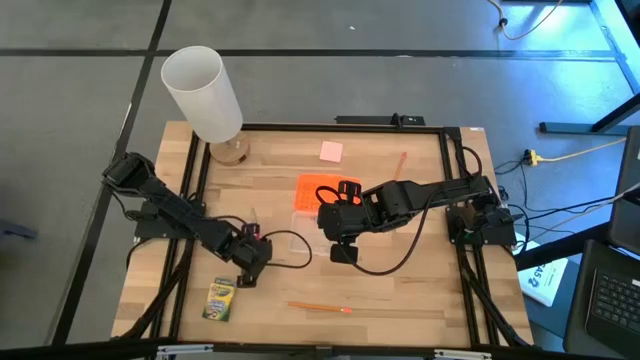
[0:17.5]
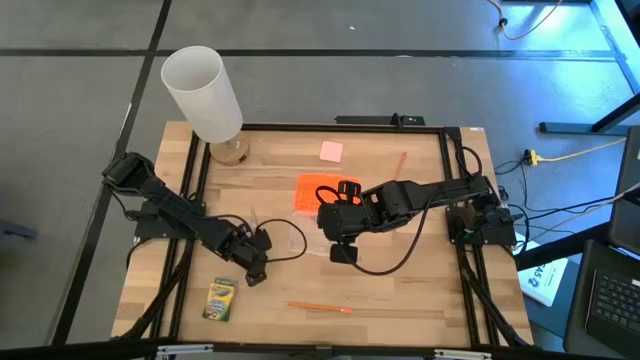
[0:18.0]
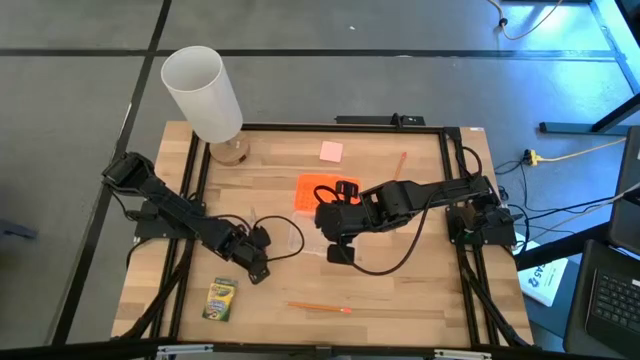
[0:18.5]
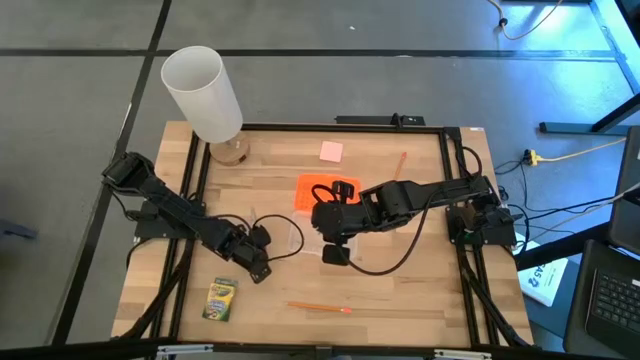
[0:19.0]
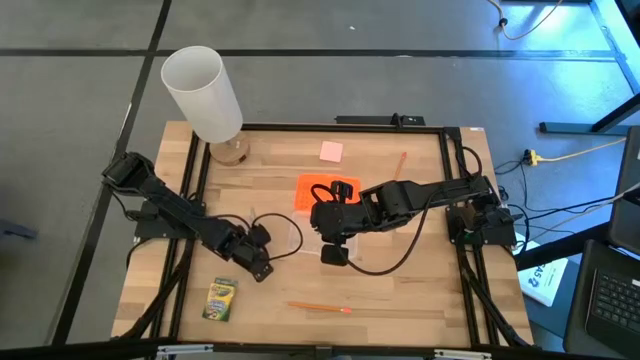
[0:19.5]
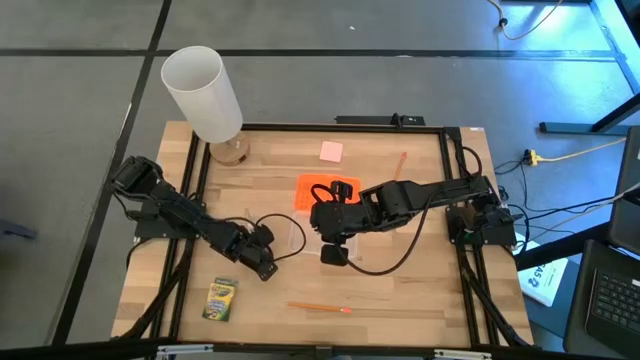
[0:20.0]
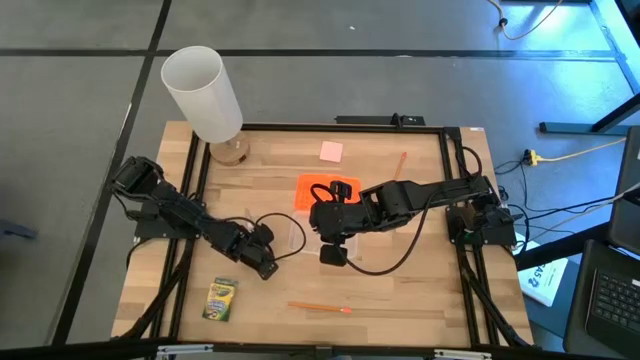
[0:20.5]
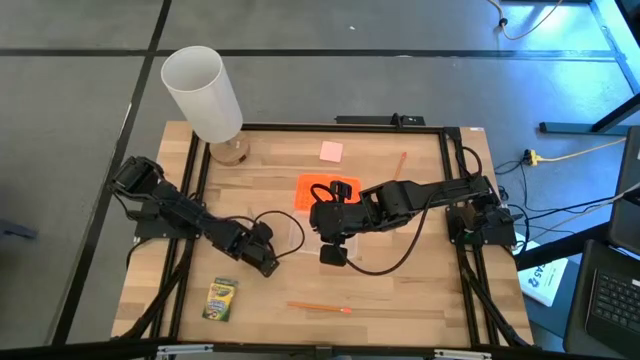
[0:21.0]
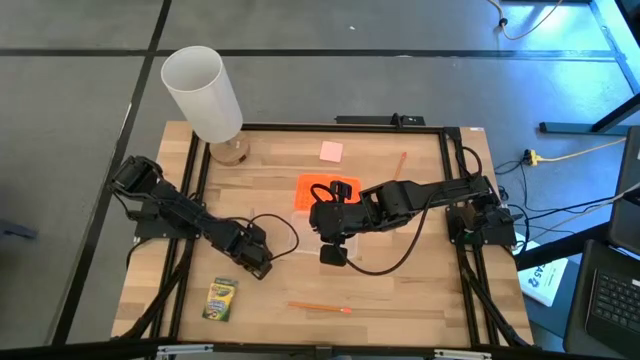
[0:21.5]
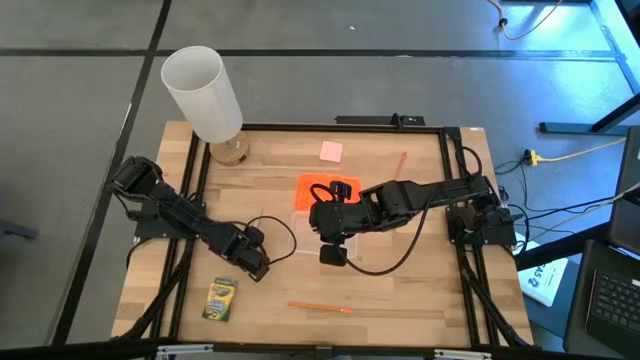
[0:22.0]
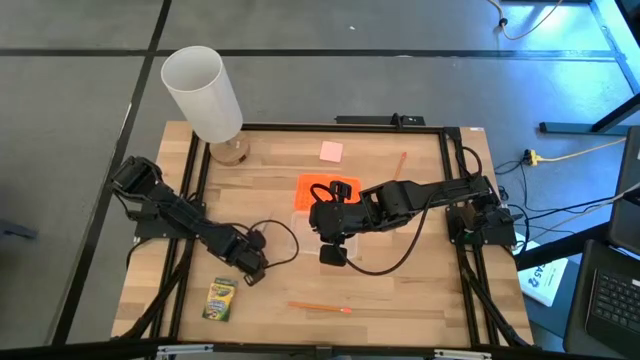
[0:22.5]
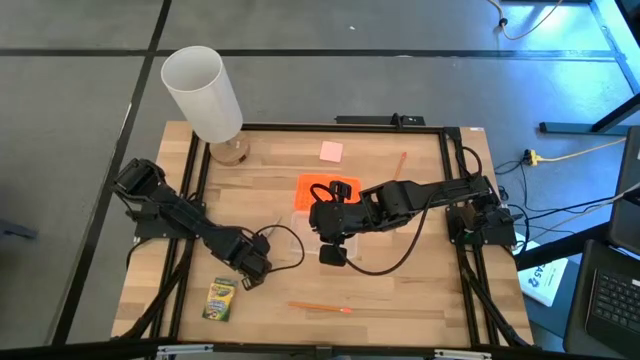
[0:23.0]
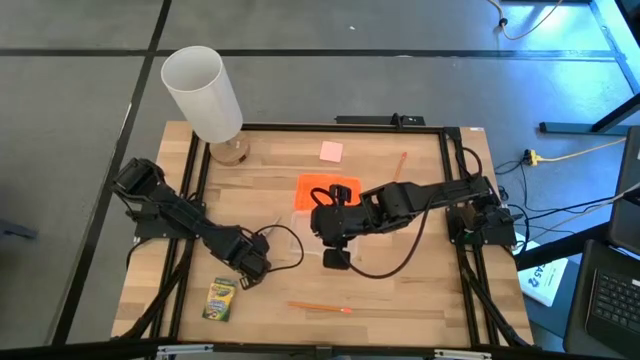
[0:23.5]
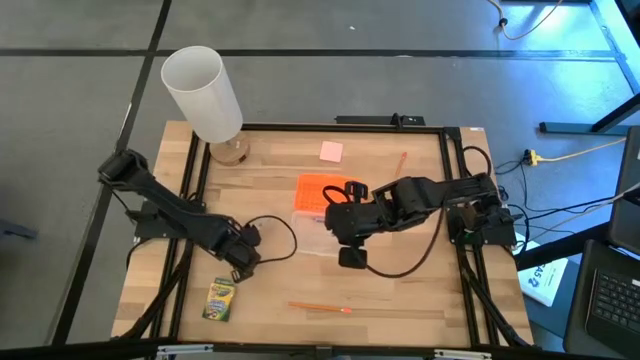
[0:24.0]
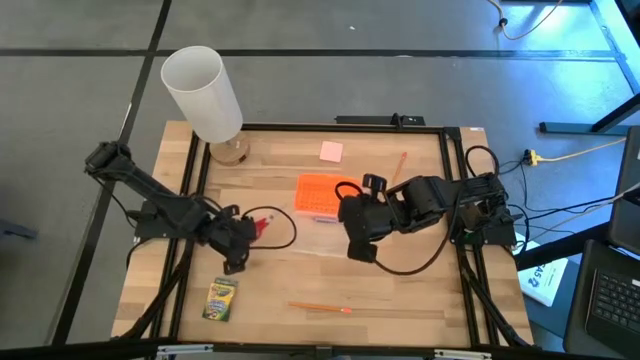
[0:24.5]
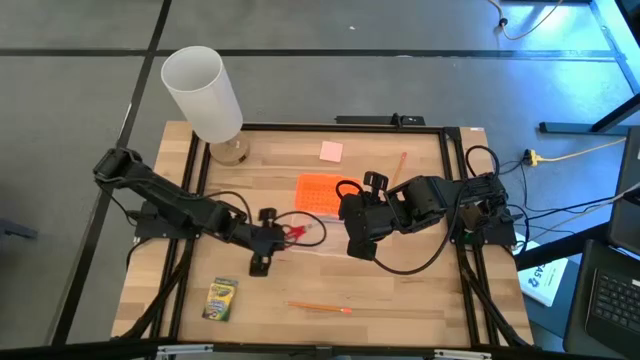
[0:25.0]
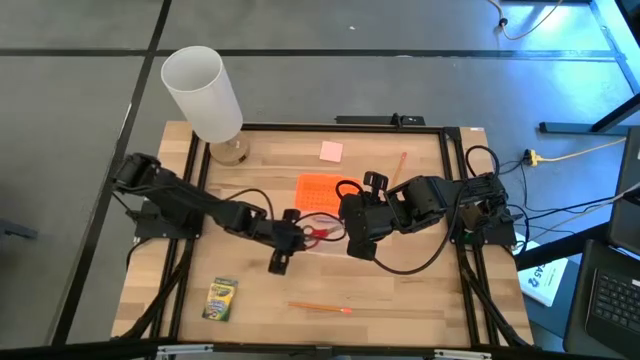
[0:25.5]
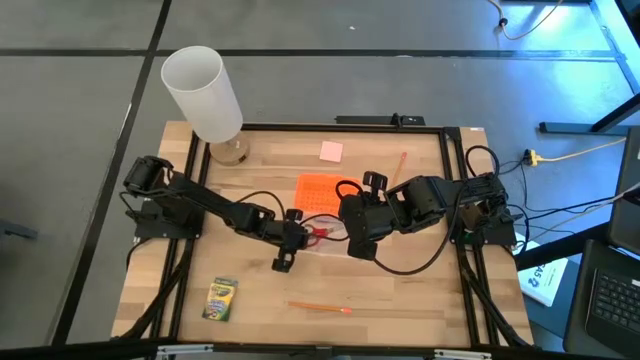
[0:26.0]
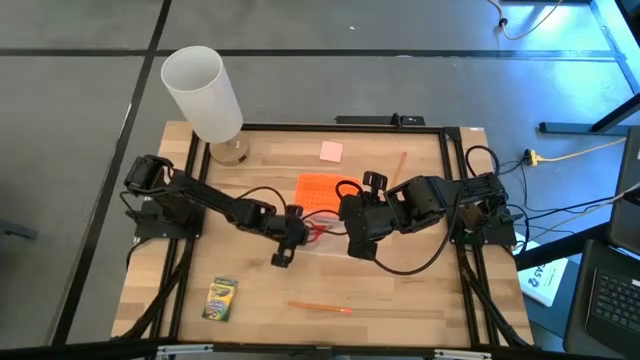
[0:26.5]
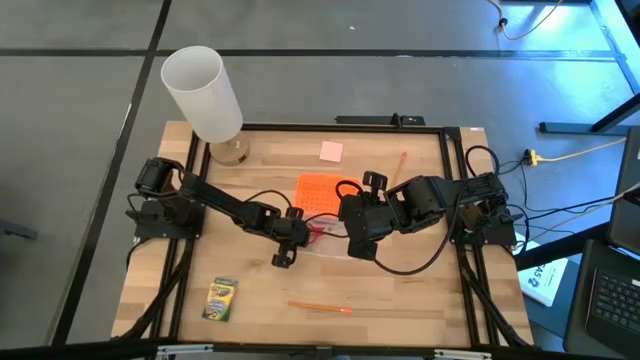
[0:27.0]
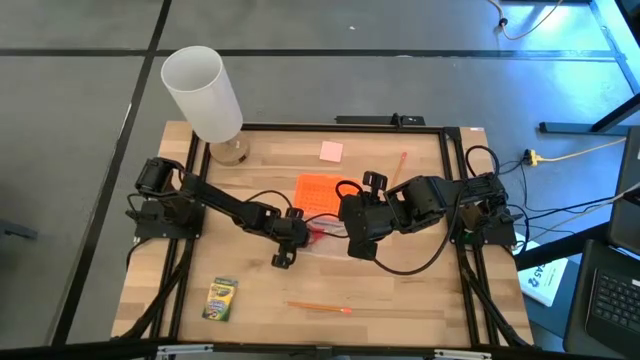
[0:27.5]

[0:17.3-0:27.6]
Task: Pack school essentials
Put the scissors into the orange supply box

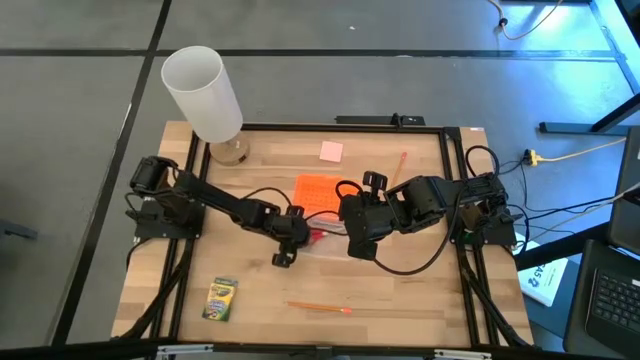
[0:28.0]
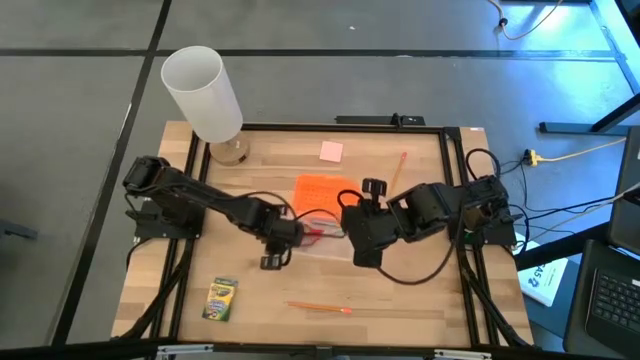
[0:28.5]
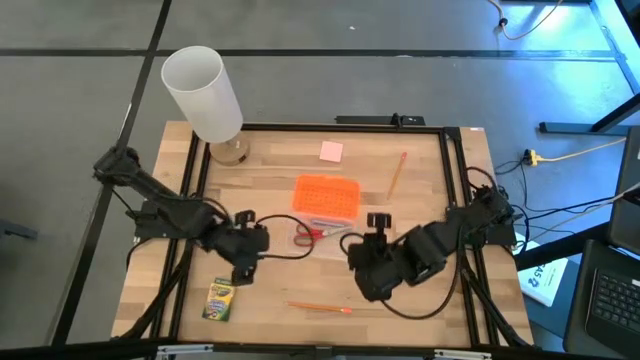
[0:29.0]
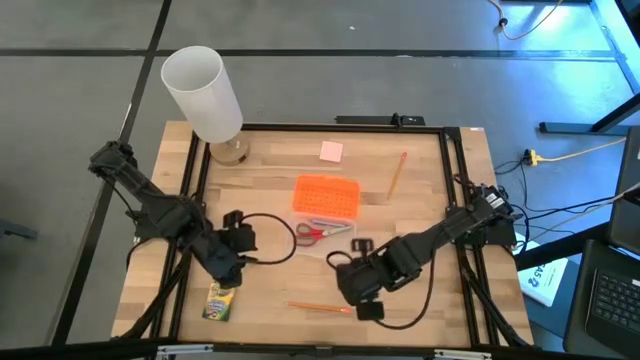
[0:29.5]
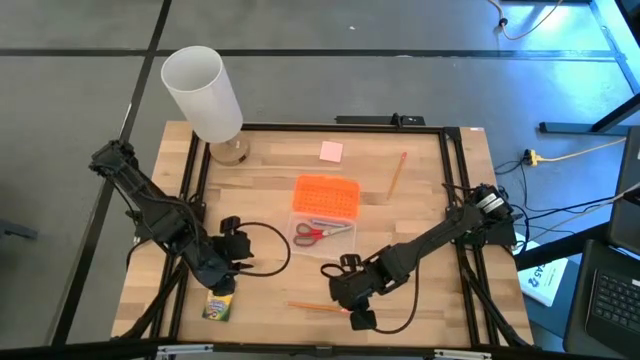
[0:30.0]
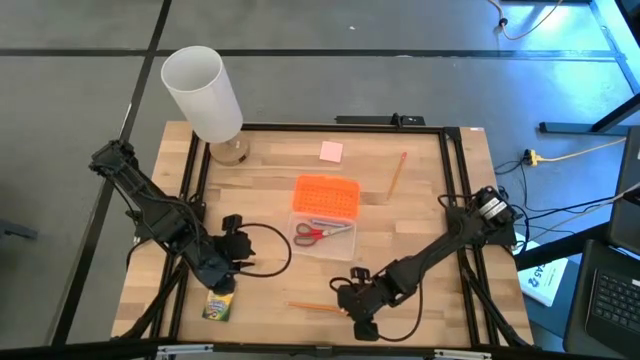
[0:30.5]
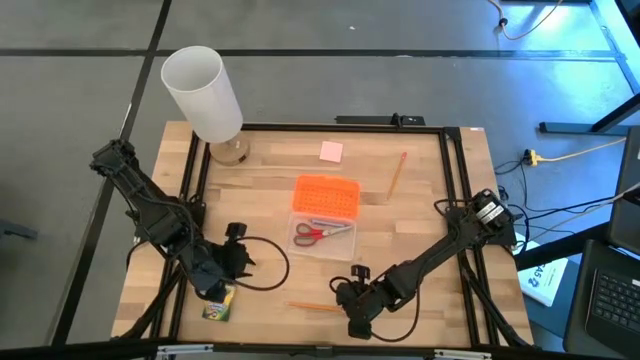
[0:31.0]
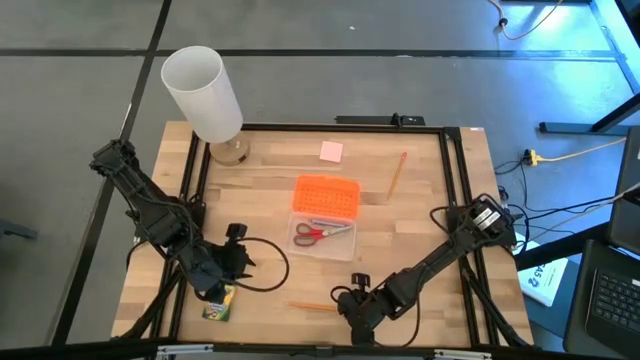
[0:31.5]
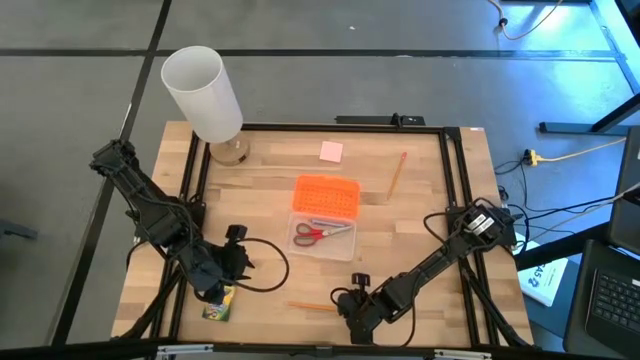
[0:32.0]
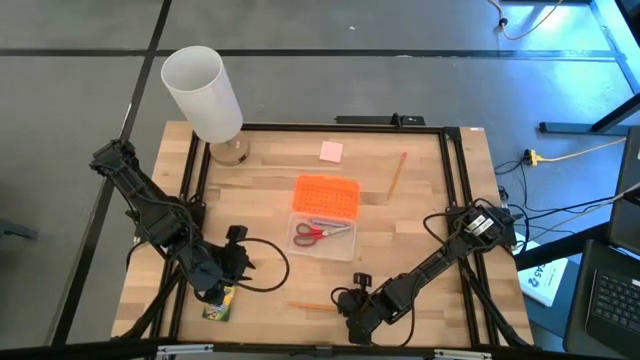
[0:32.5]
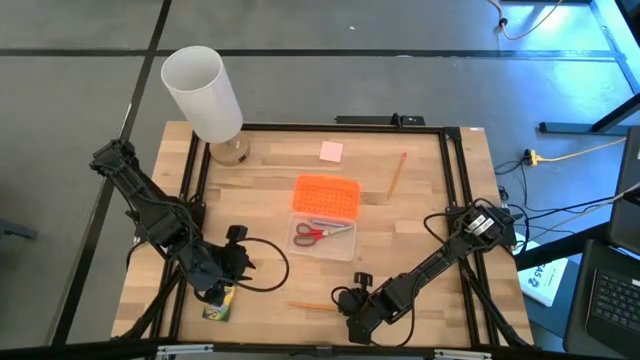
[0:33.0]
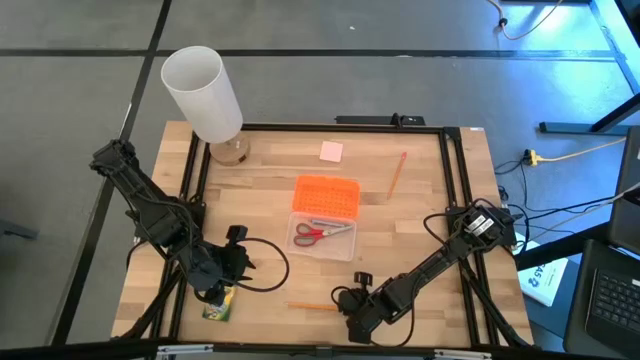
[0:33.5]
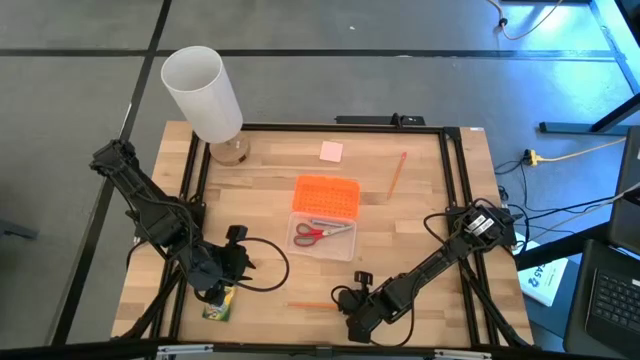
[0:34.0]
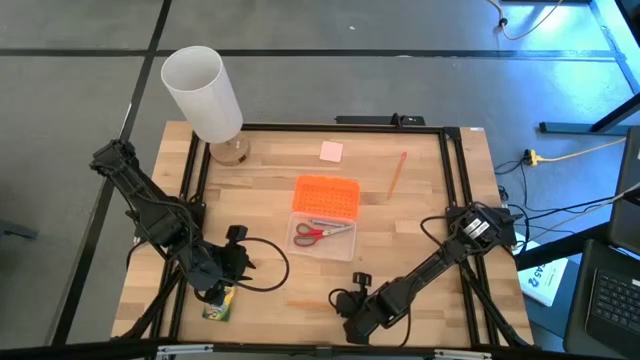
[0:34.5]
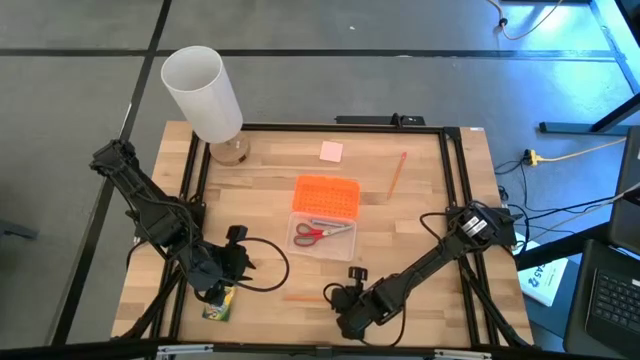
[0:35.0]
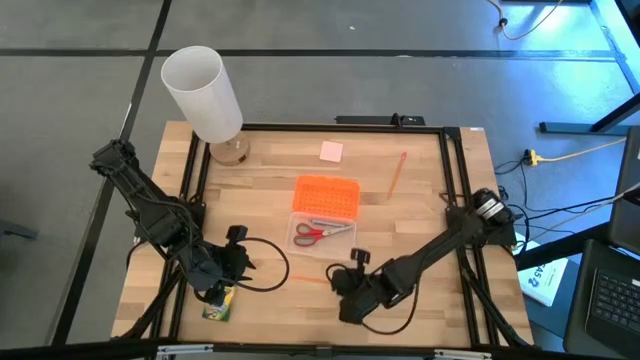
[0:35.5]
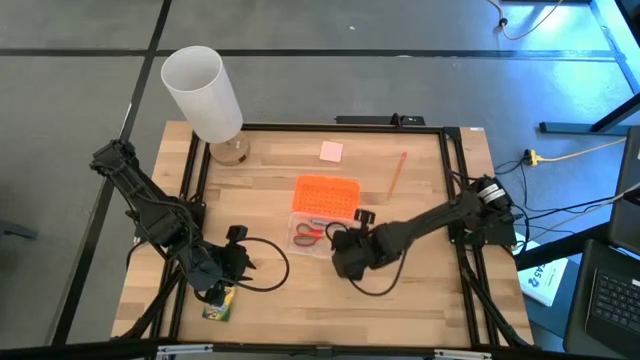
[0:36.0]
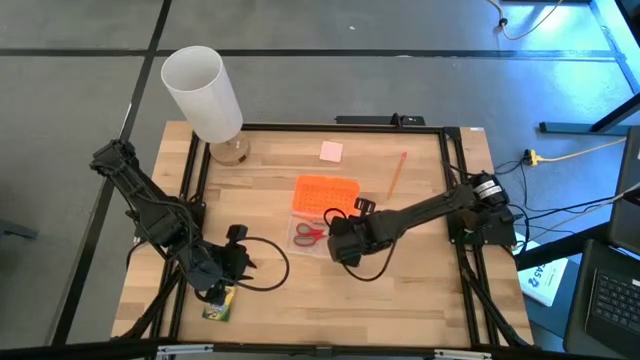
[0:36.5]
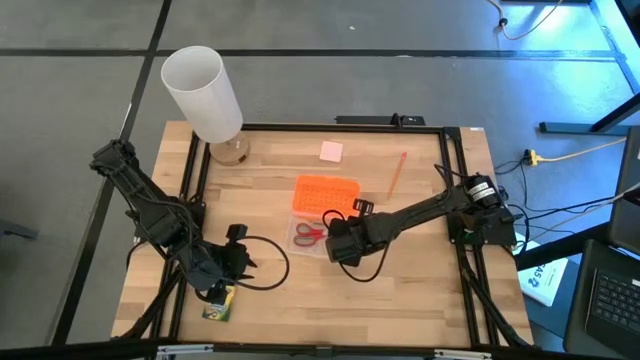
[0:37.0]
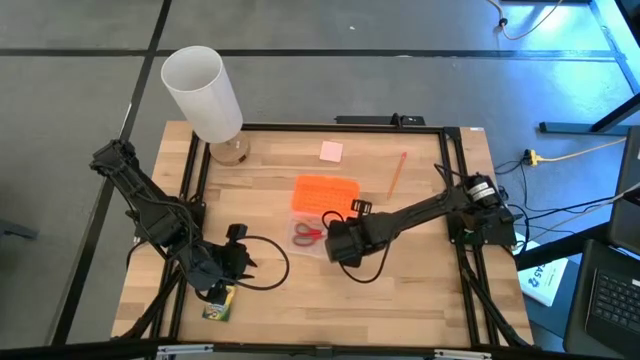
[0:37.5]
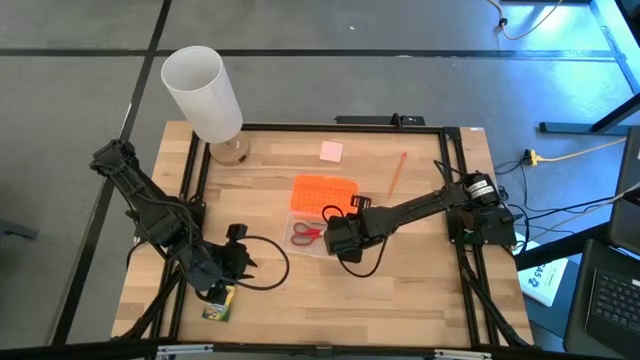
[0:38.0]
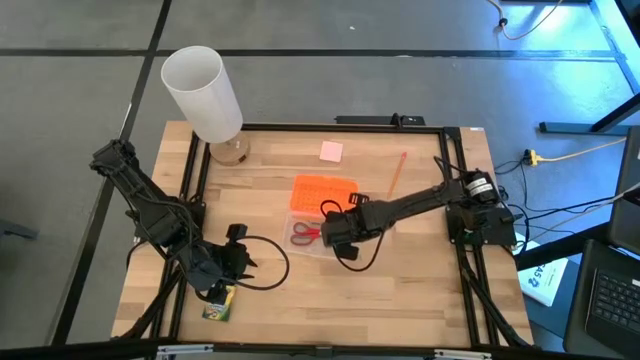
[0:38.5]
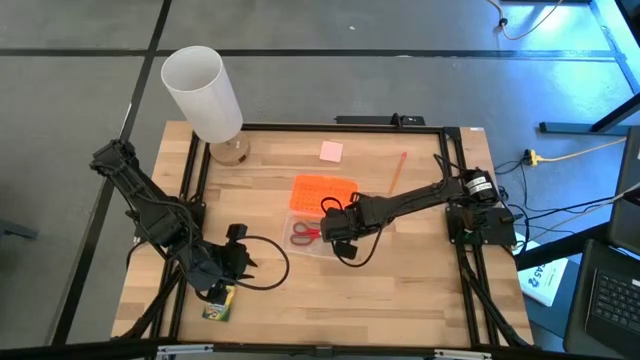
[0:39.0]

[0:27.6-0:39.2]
Put the bottom orange pencil into the orange supply box
